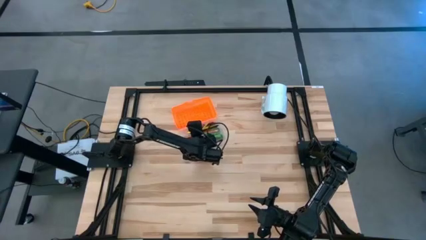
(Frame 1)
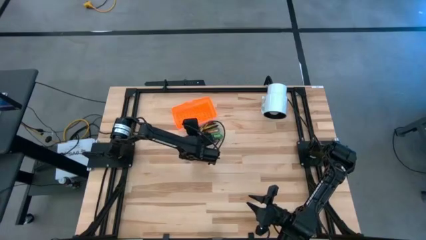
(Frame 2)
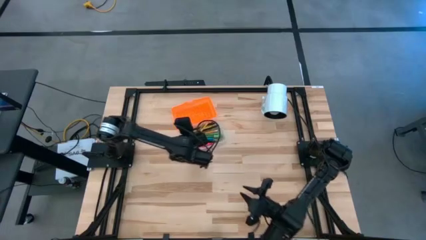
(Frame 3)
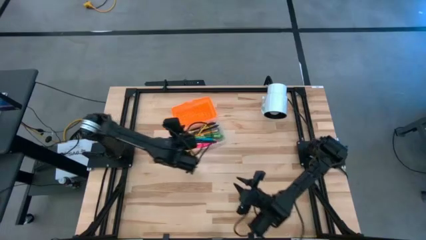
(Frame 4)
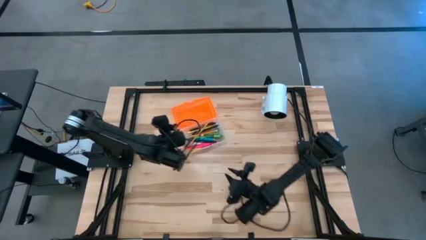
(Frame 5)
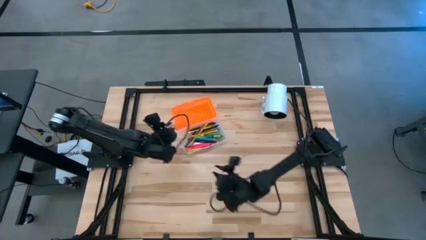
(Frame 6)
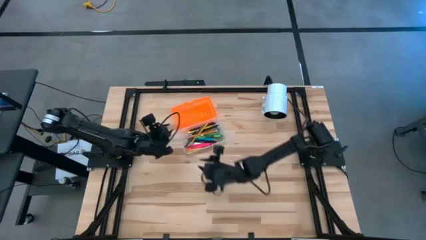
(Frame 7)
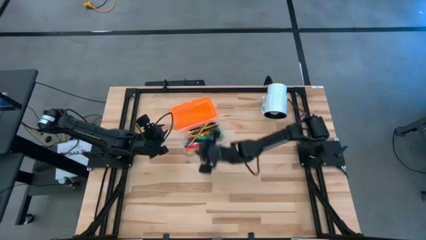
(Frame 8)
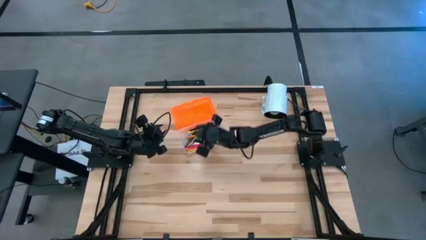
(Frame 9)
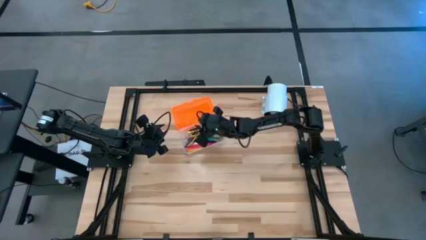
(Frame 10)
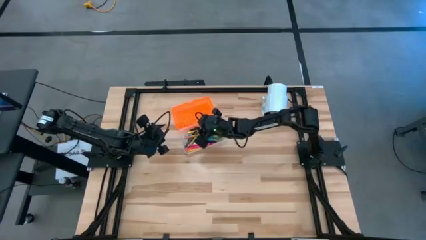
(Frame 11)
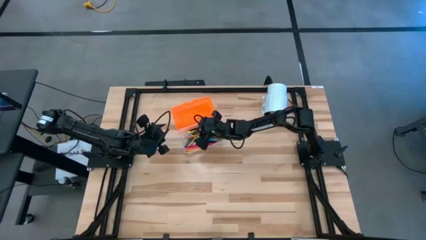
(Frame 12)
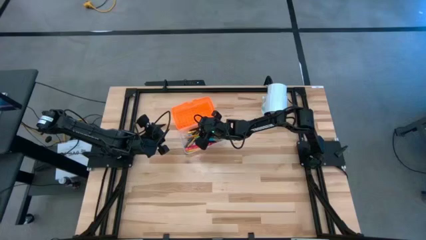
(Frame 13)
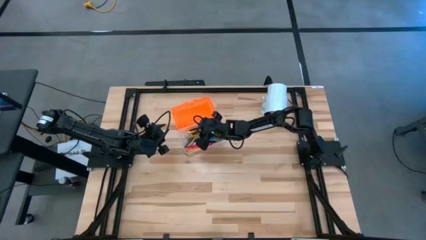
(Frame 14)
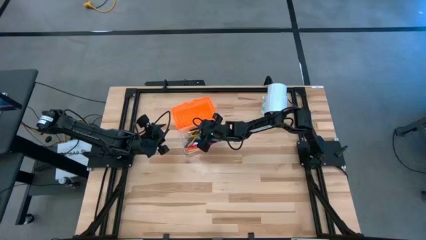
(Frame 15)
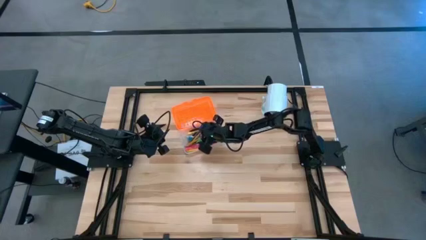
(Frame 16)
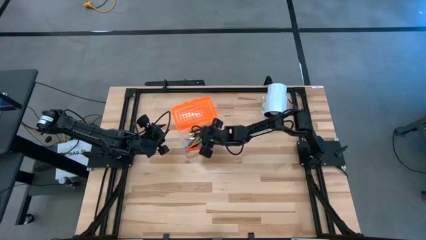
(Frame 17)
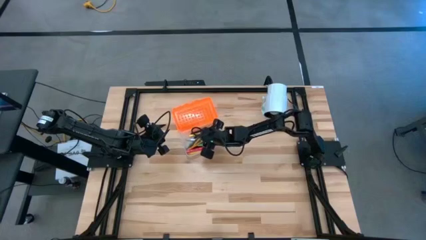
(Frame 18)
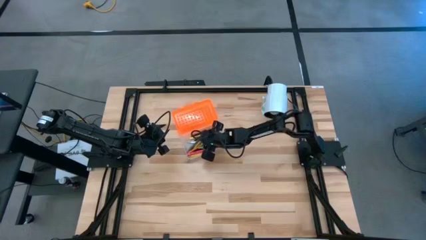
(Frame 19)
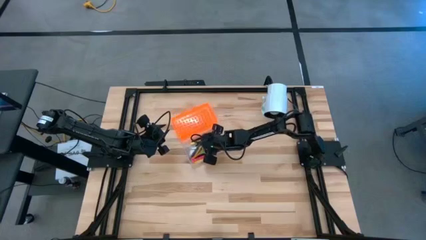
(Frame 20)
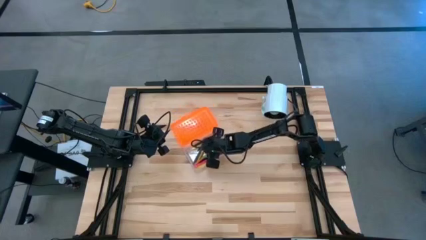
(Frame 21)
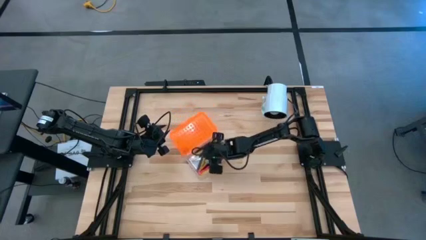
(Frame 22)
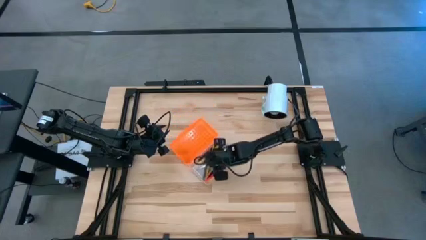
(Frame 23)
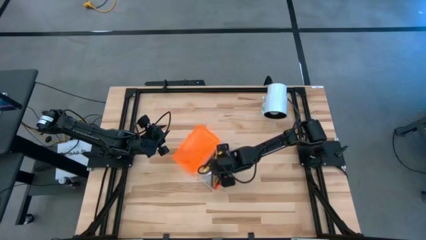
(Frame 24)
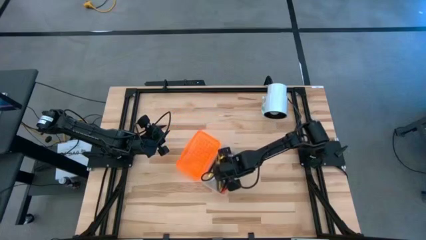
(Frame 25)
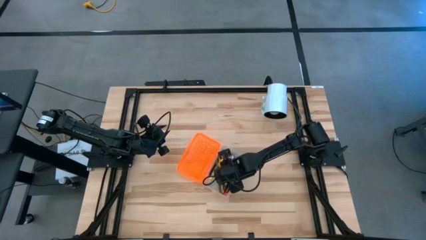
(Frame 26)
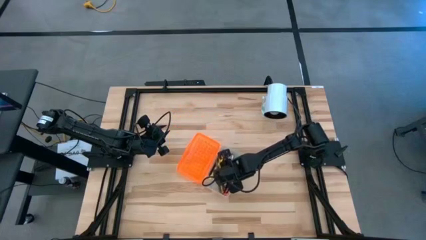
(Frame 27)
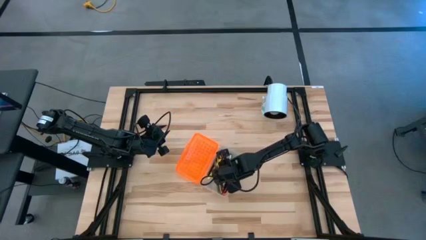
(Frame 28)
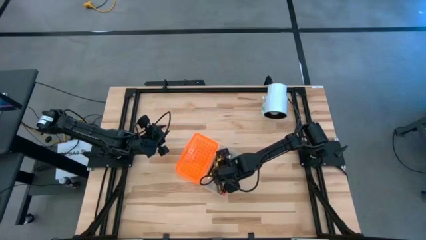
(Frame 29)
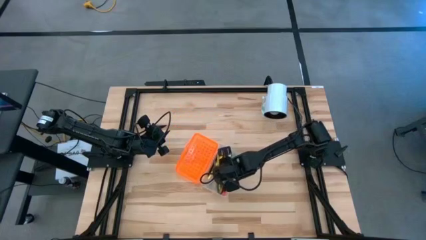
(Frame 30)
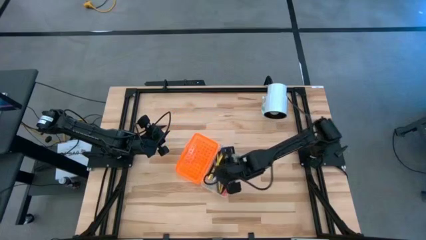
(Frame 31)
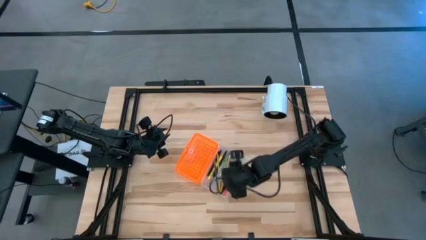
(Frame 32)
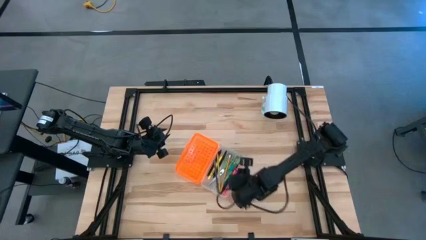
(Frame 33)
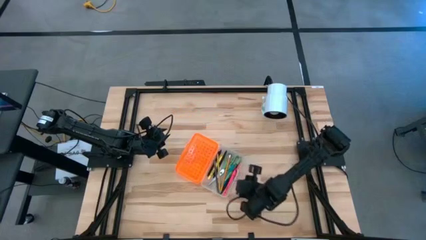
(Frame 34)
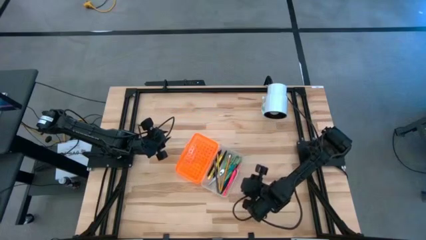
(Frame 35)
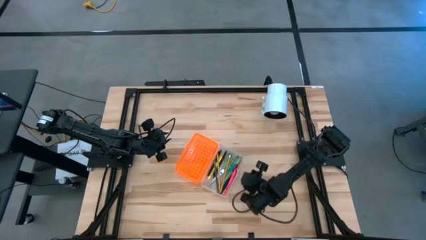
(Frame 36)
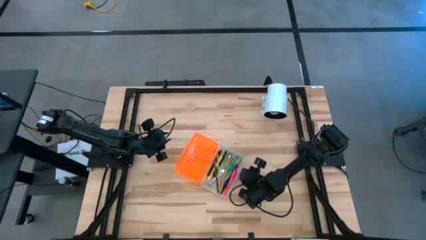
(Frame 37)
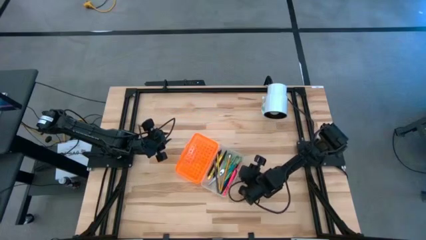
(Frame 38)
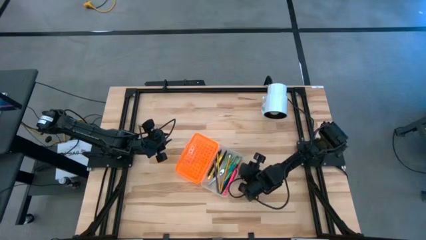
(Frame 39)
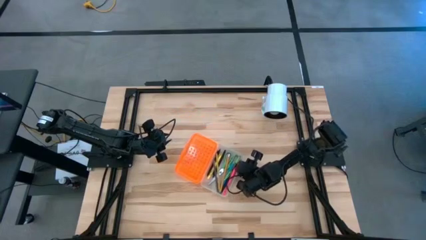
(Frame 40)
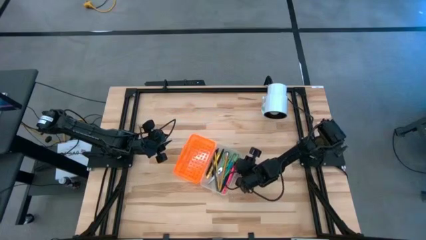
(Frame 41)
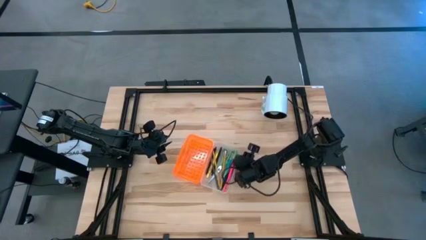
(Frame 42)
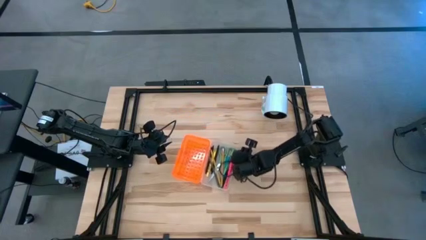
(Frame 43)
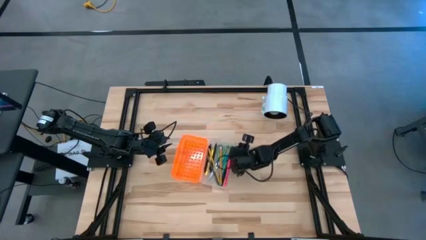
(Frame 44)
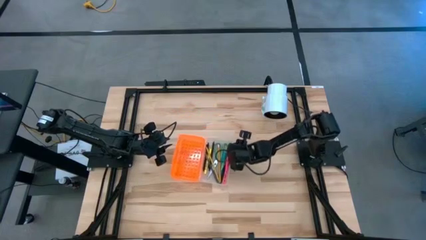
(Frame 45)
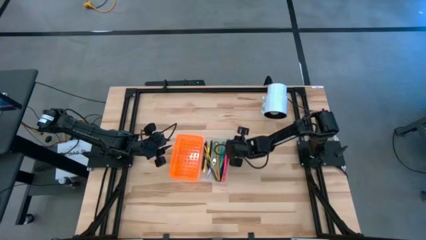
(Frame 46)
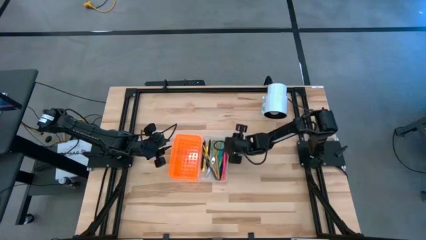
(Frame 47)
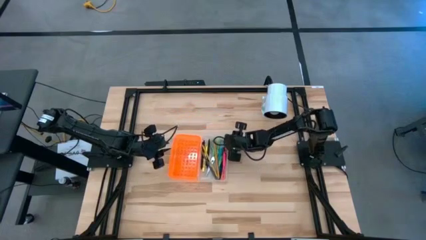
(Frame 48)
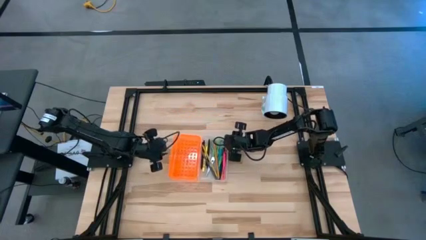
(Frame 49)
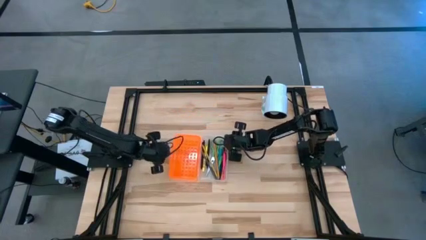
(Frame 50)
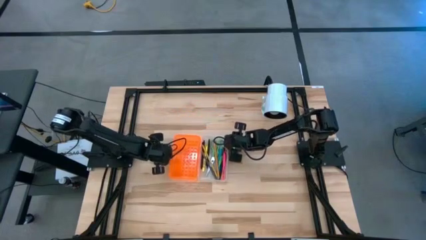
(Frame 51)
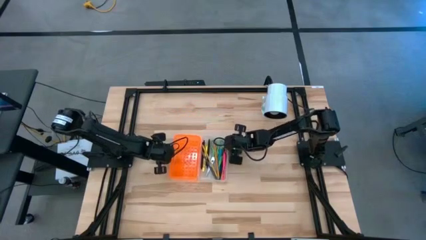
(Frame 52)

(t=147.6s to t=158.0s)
Task: Pick & place school supplies into a supply box
Adjust the supply box

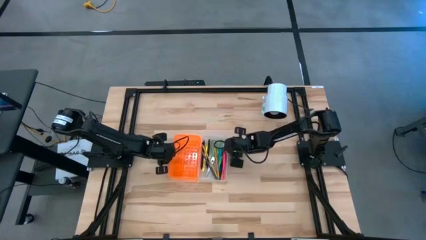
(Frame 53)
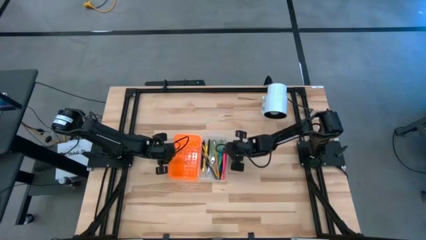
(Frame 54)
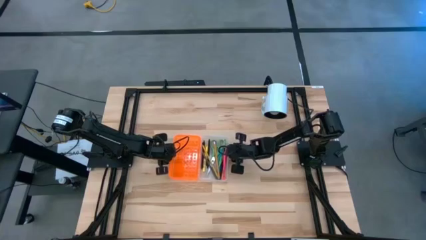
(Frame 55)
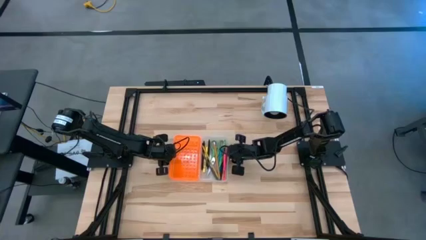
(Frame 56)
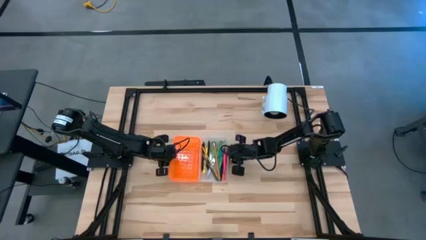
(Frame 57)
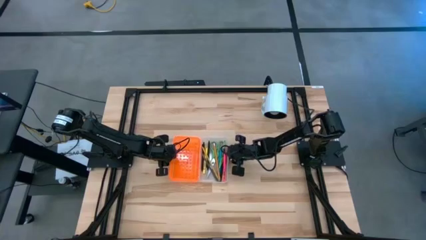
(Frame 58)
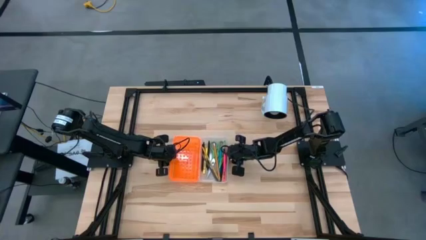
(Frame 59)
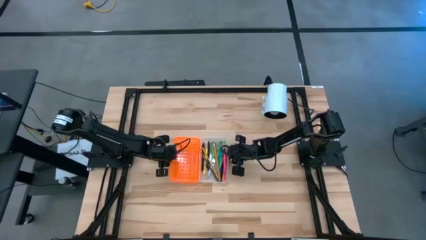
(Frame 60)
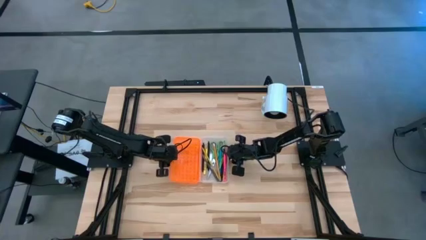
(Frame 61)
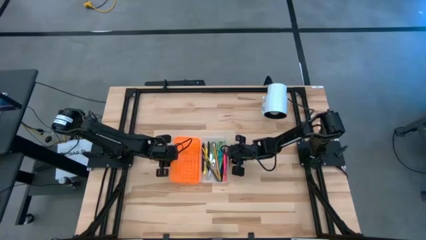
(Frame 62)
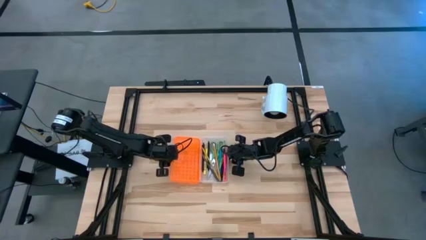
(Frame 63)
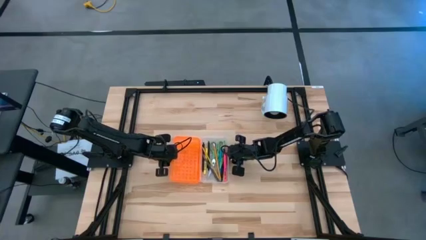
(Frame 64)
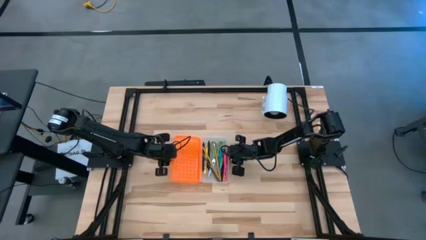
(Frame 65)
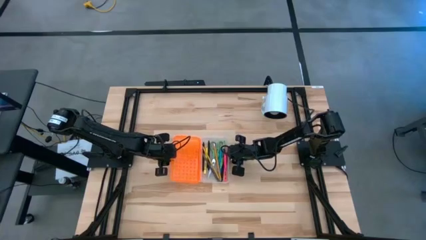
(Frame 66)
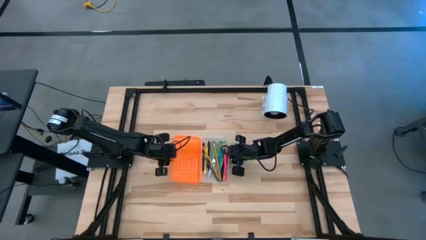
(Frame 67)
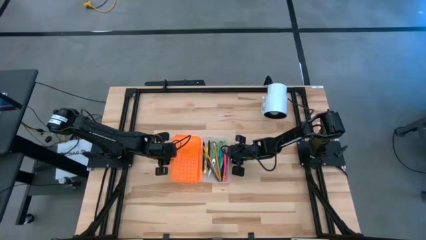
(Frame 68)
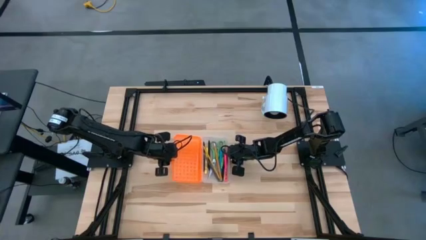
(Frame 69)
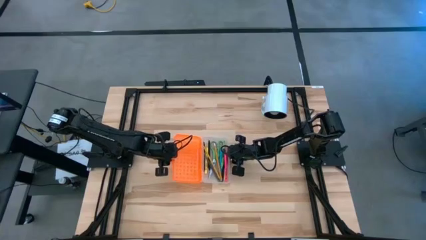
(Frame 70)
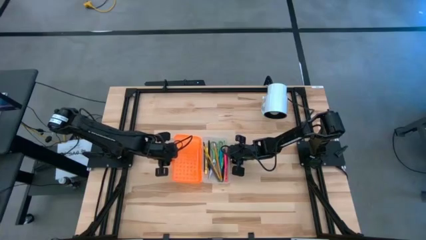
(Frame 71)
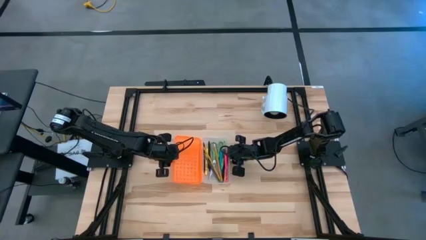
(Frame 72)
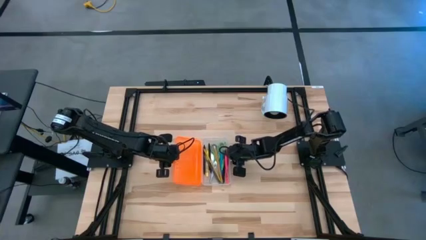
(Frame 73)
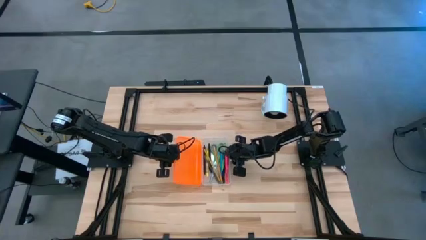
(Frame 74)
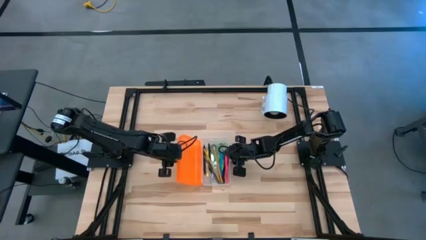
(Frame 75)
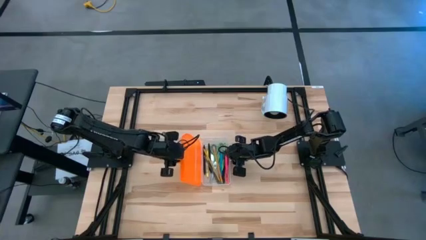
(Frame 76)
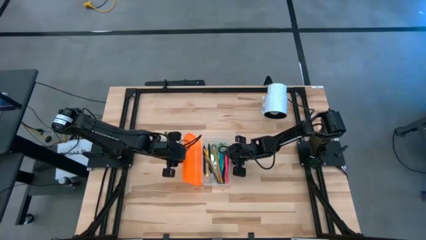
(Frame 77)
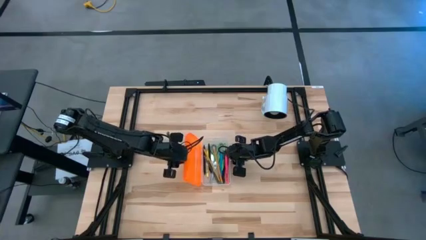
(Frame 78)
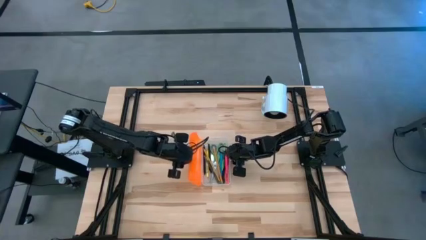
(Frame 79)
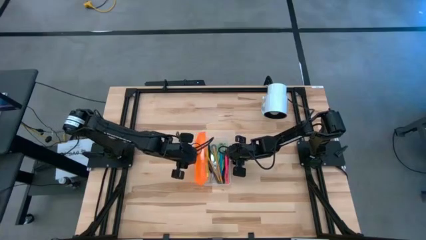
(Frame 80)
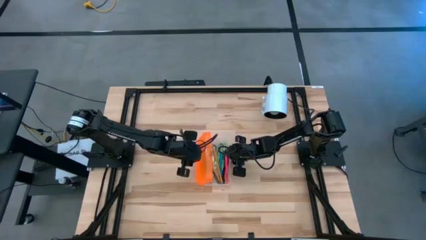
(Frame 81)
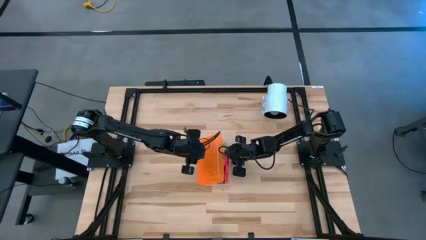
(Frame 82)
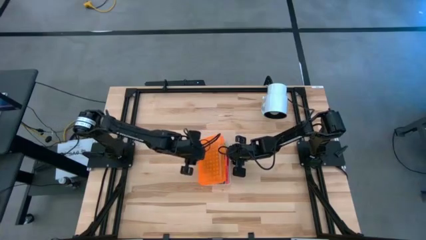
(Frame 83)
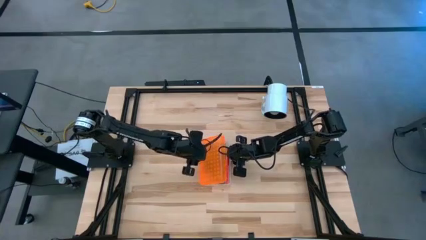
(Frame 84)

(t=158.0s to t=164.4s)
Close the supply box
